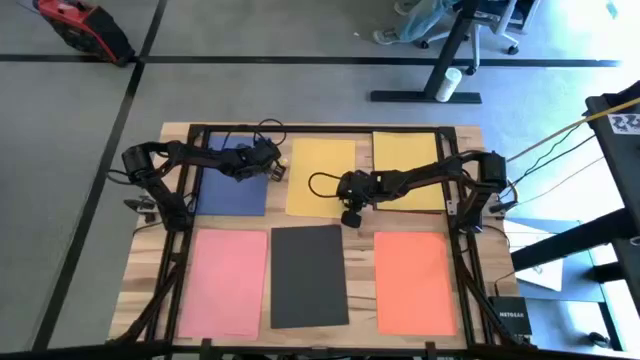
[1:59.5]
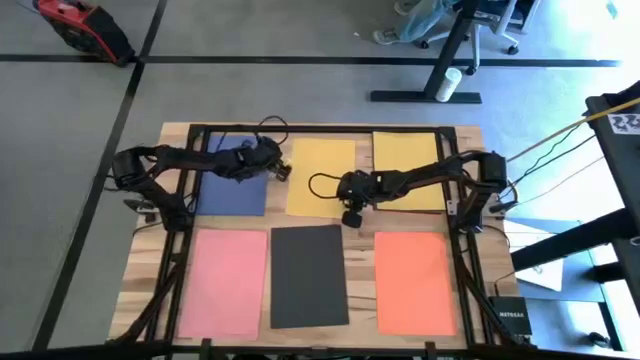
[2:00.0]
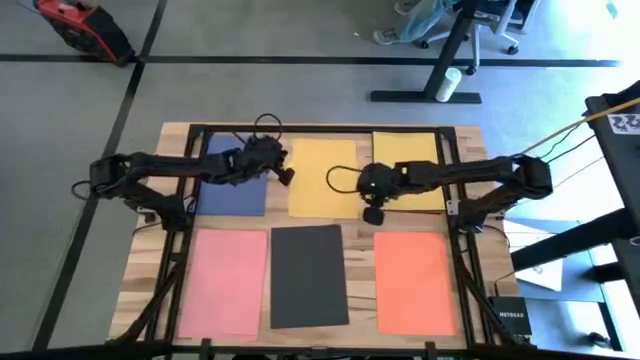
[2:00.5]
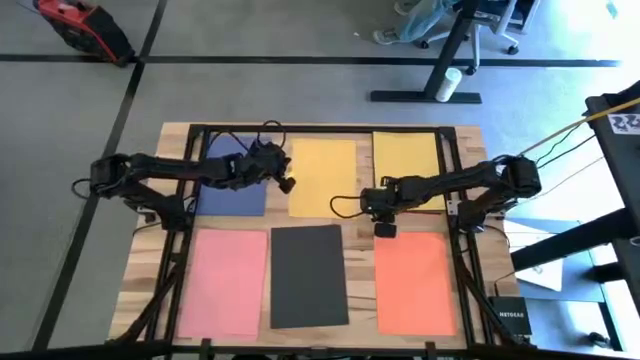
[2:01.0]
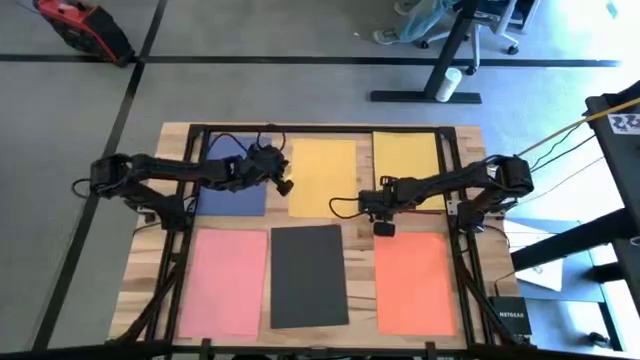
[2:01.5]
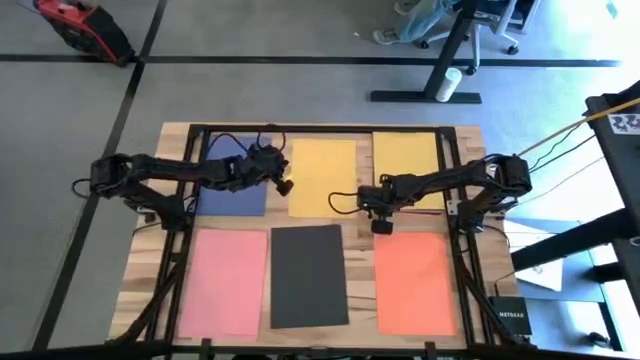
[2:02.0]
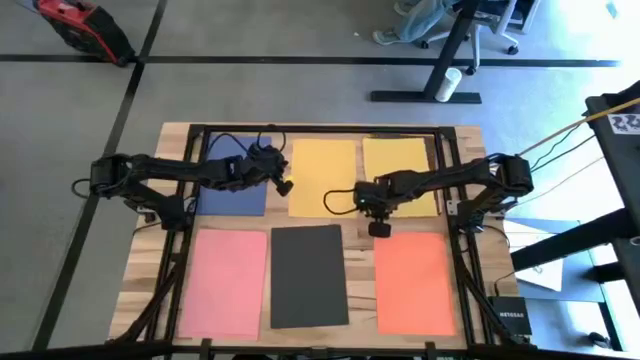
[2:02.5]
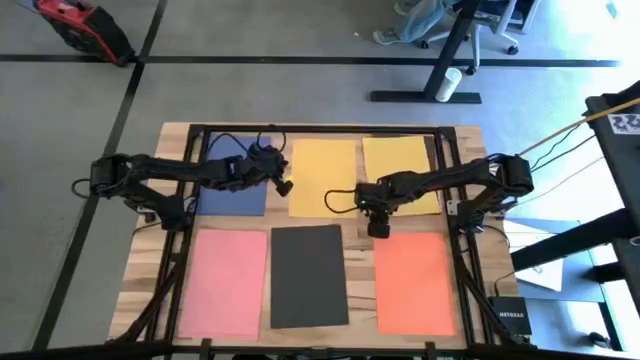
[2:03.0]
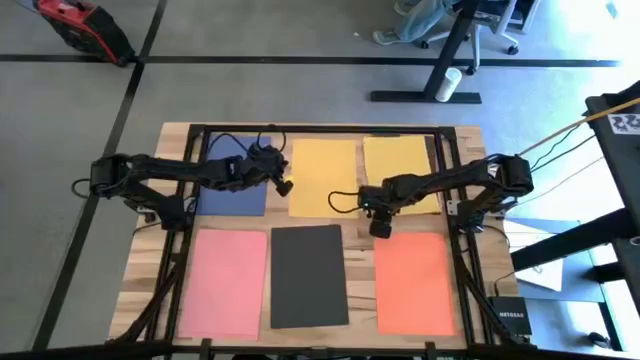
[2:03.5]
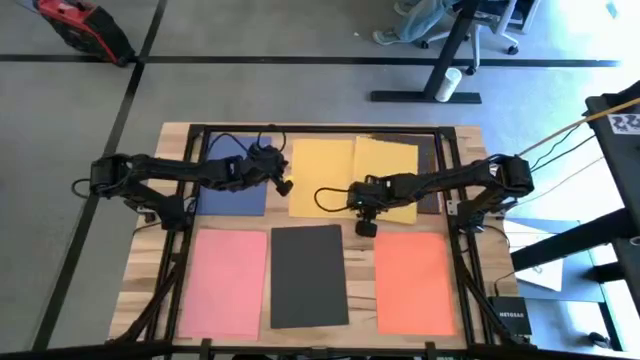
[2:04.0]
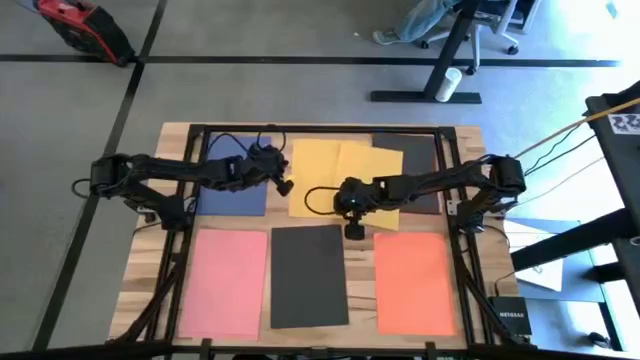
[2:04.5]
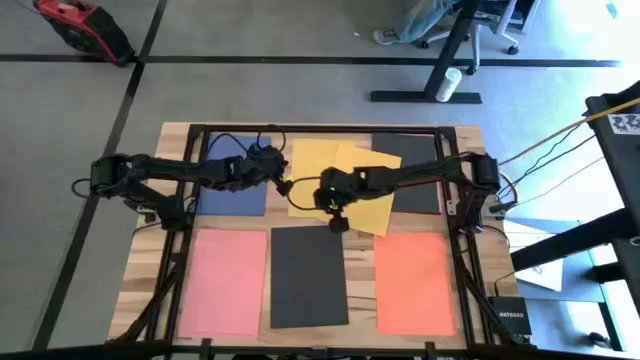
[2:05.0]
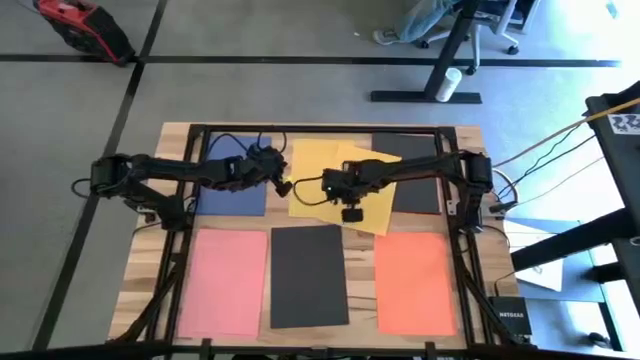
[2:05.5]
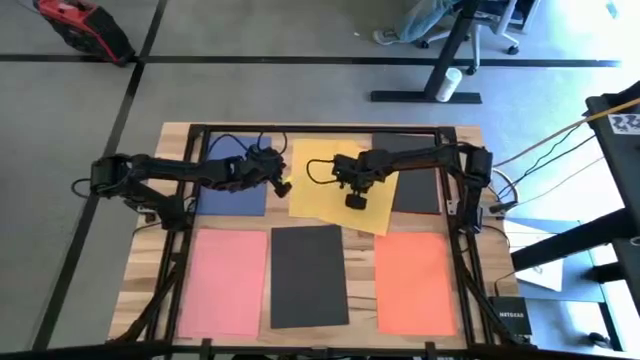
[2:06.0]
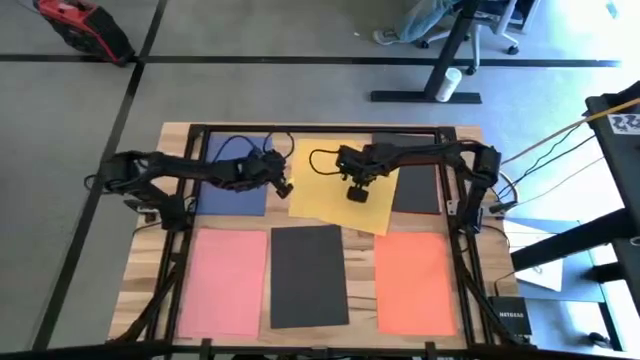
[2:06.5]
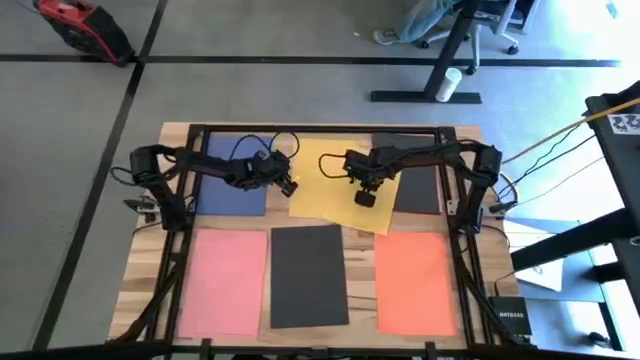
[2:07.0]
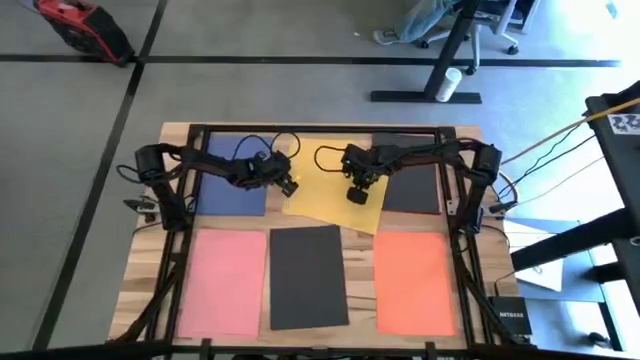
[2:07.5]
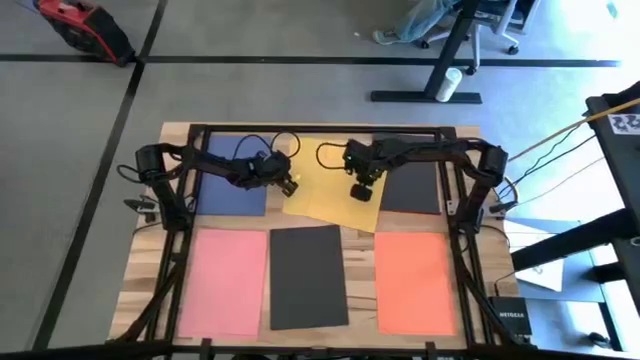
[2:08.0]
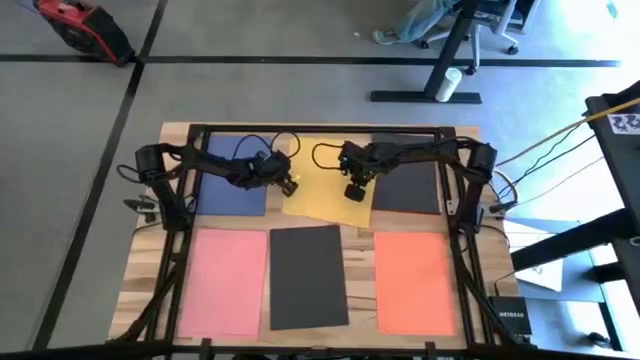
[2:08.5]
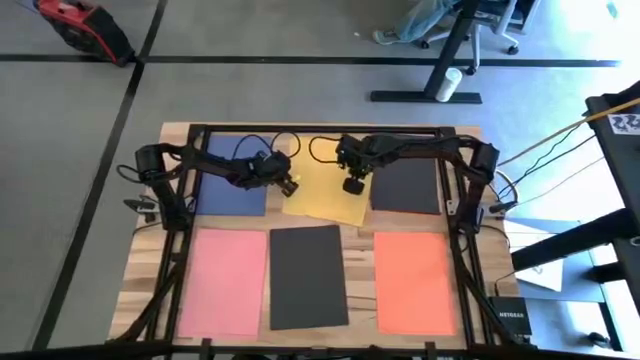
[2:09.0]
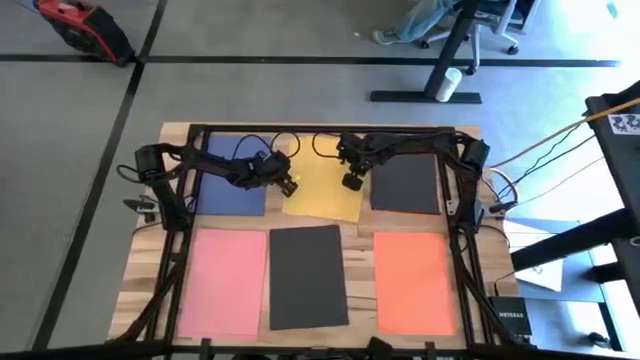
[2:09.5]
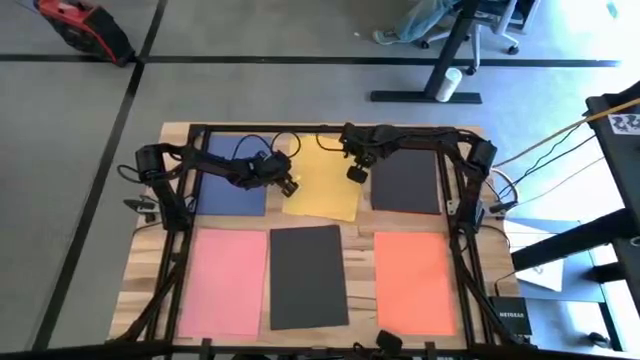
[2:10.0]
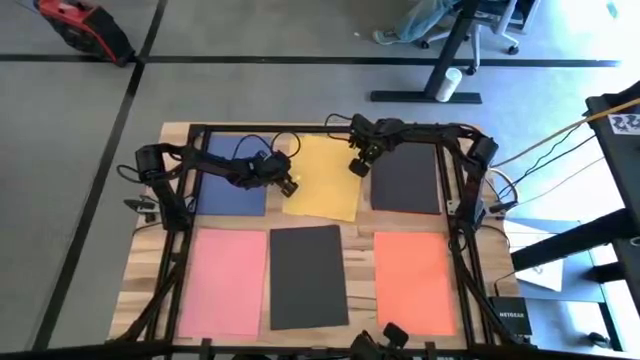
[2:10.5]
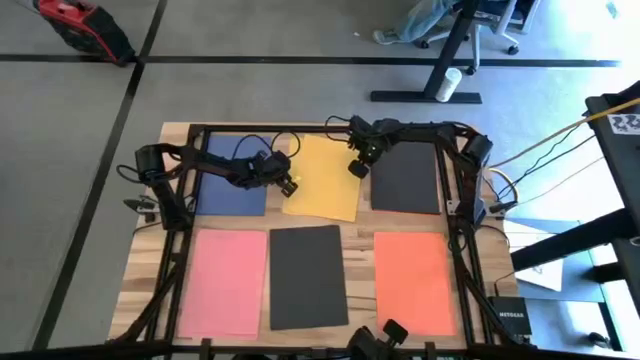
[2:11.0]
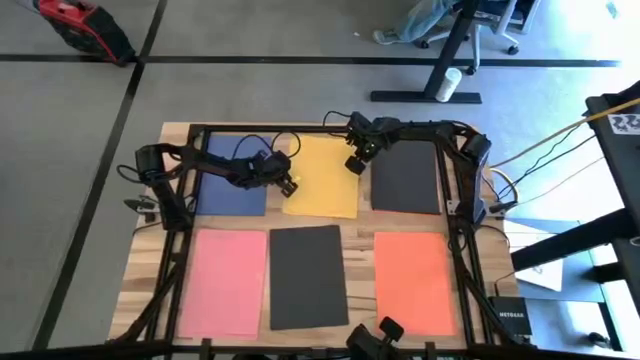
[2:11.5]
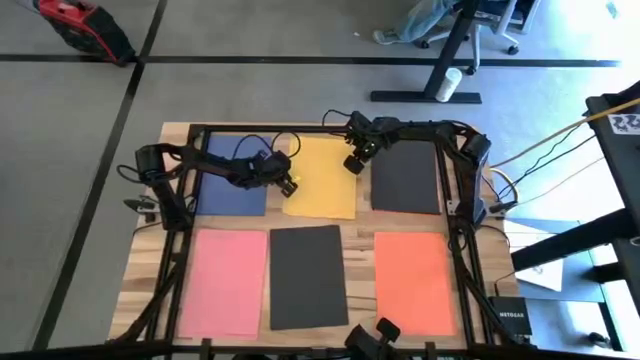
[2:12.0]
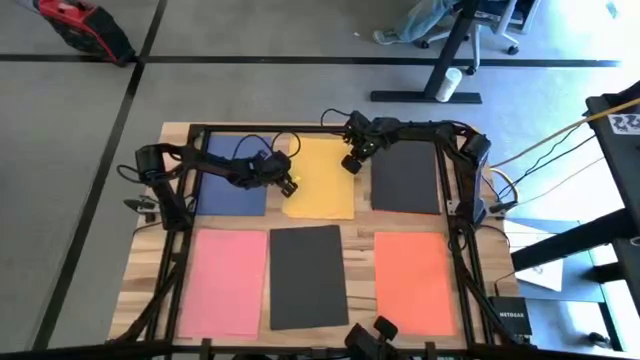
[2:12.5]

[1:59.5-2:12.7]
Task: Organize paper
Stack the yellow paper on top of the other yellow paper

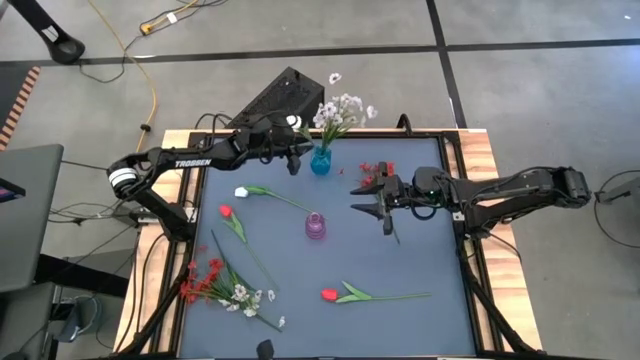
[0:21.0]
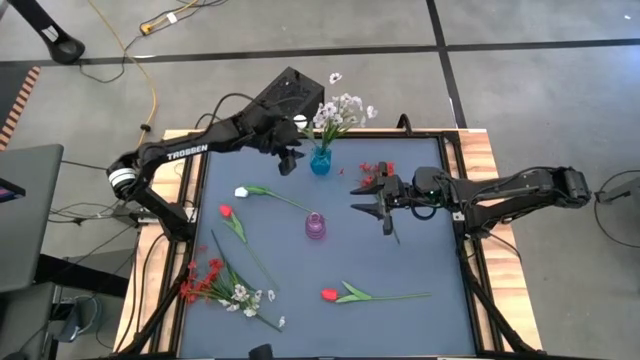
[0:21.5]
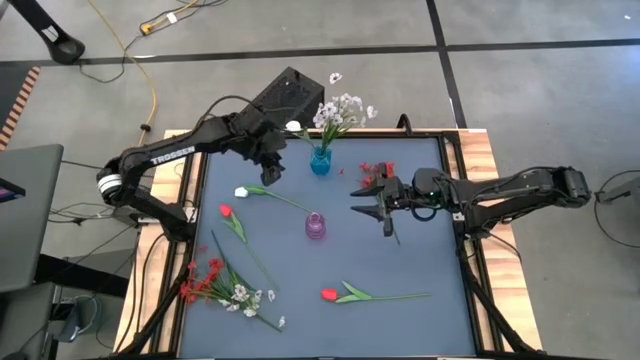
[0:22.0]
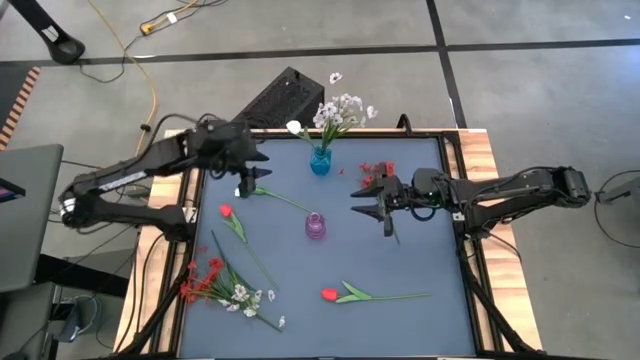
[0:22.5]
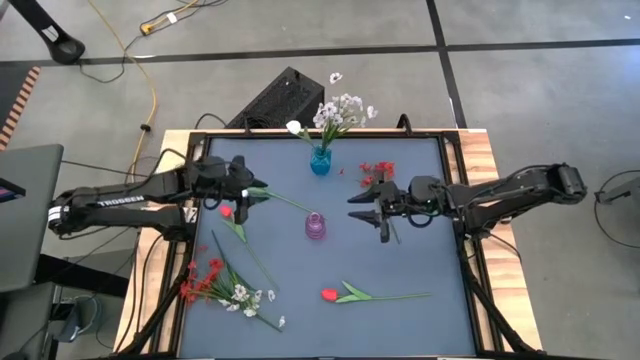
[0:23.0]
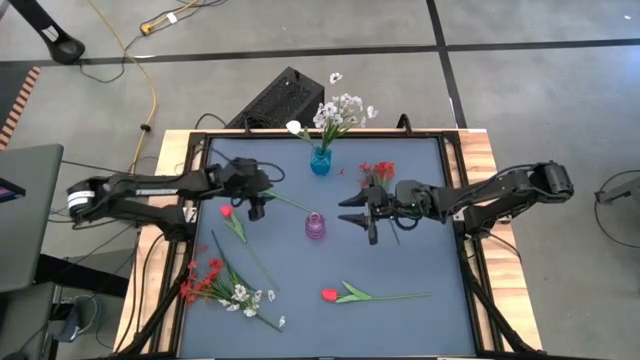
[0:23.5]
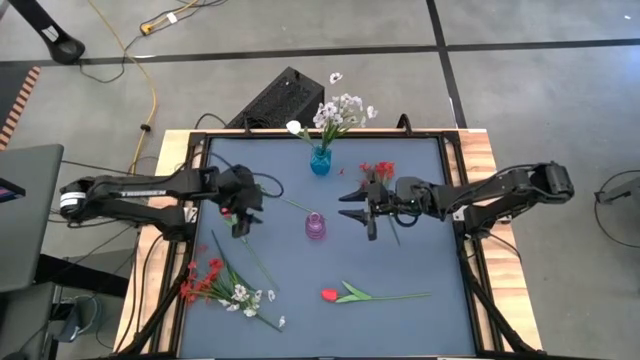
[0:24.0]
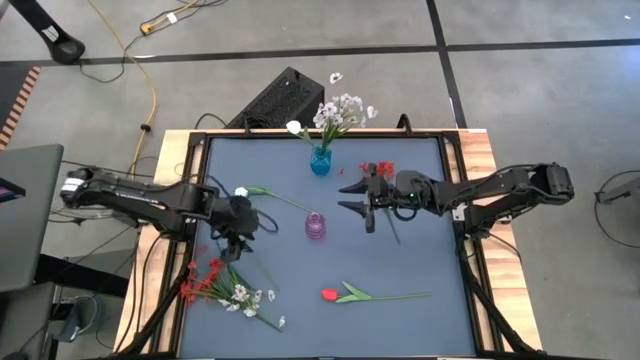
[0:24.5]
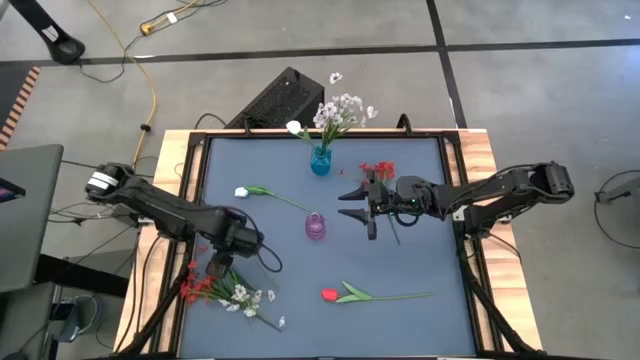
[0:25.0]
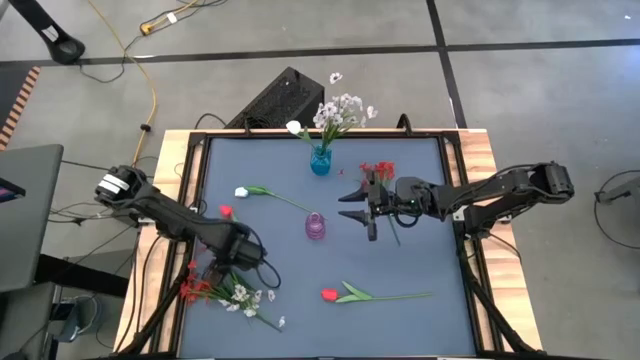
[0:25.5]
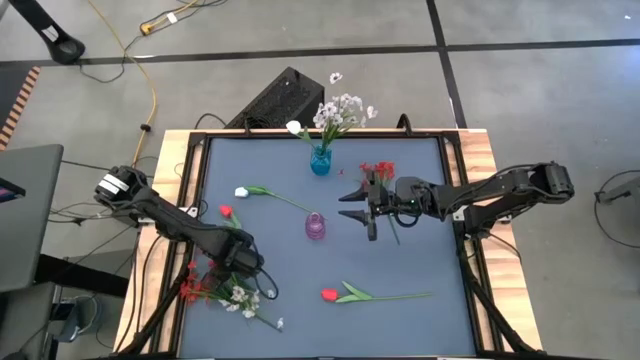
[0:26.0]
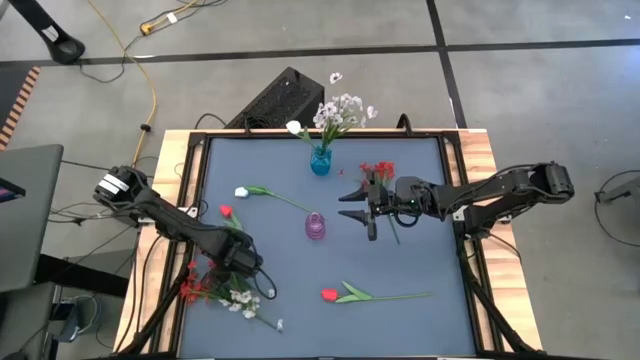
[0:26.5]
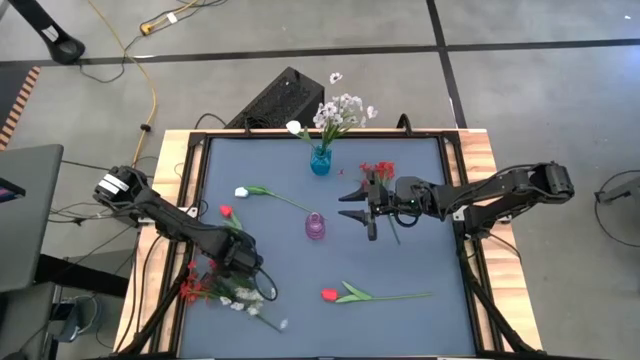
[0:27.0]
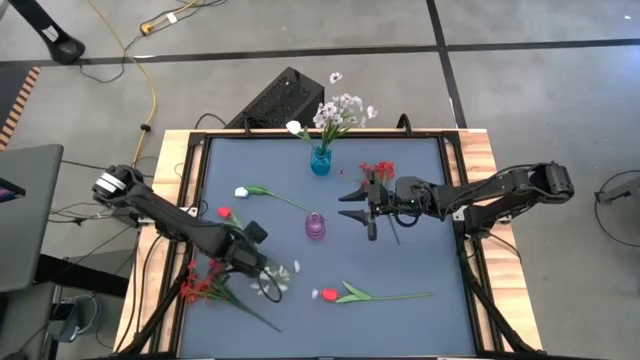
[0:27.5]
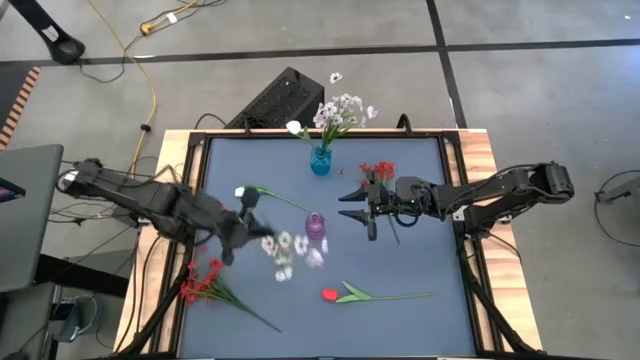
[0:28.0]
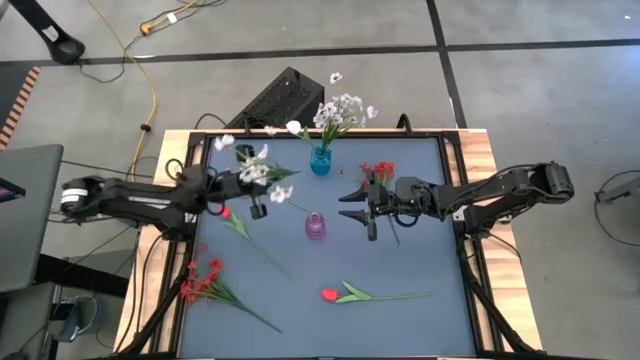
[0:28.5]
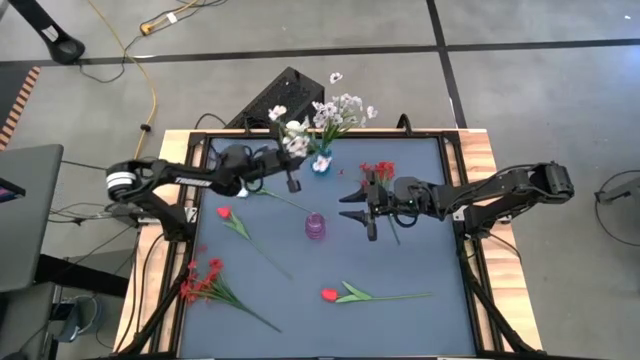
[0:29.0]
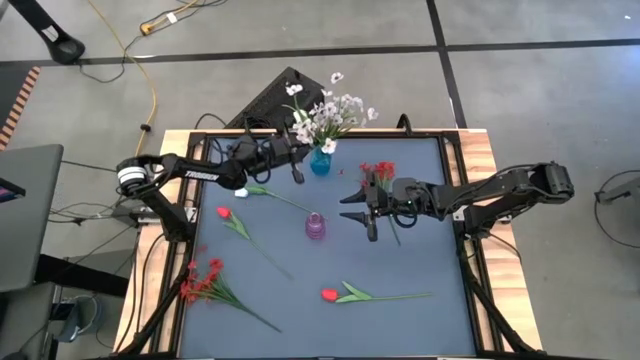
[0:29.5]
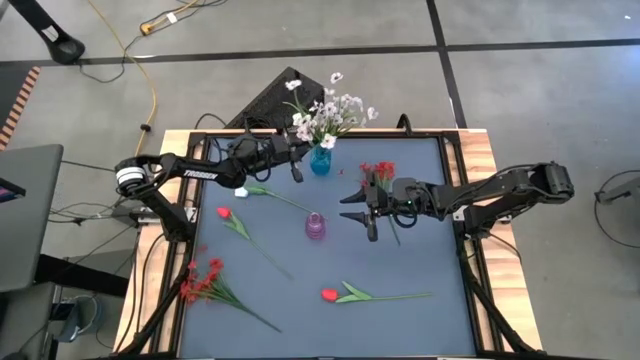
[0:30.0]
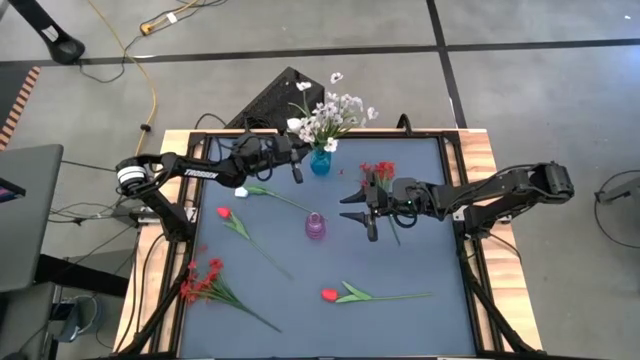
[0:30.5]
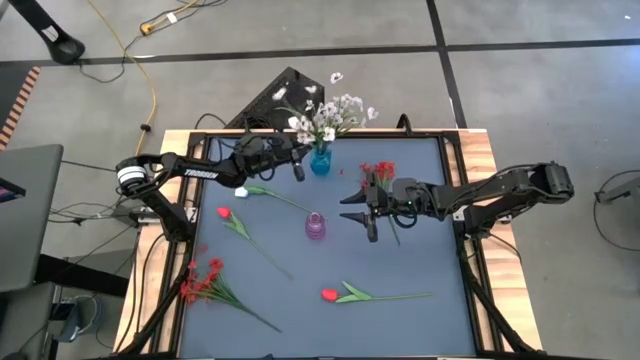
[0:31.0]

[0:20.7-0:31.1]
Task: Sort flowers into vase by color
Put the white flowers into the blue vase
